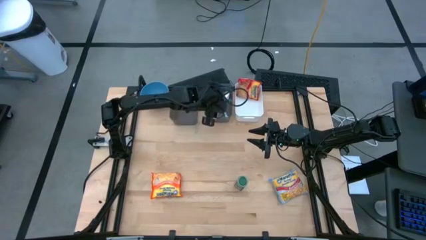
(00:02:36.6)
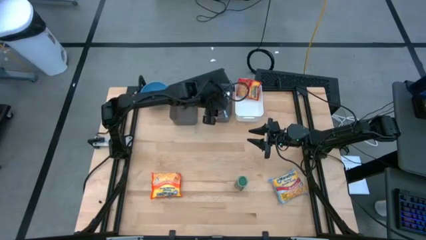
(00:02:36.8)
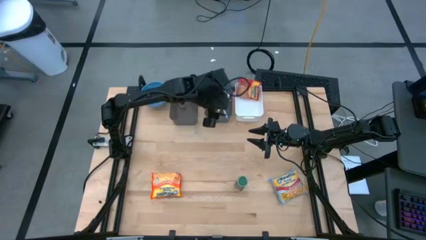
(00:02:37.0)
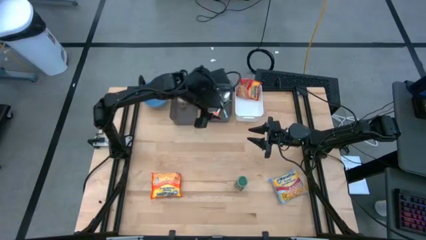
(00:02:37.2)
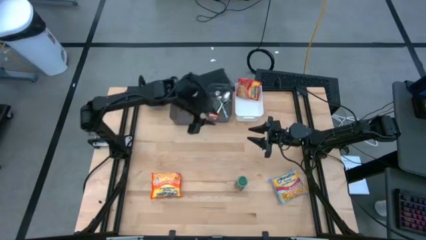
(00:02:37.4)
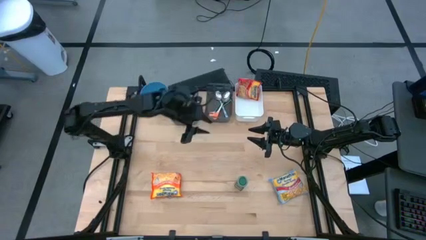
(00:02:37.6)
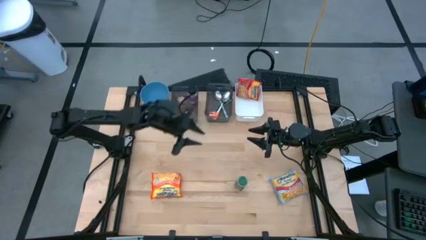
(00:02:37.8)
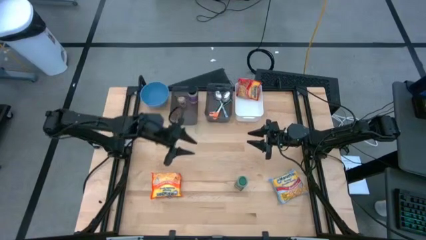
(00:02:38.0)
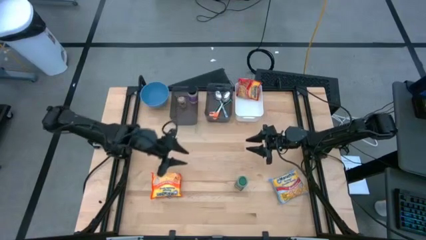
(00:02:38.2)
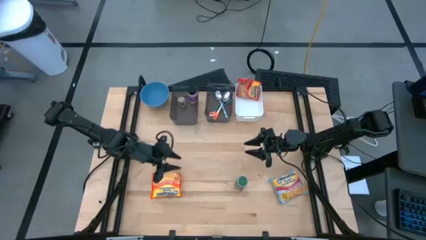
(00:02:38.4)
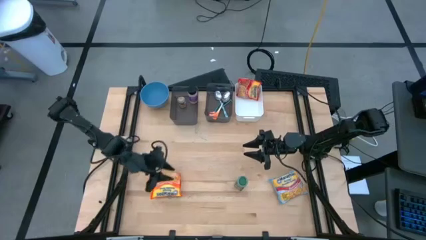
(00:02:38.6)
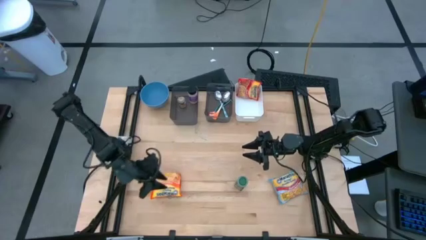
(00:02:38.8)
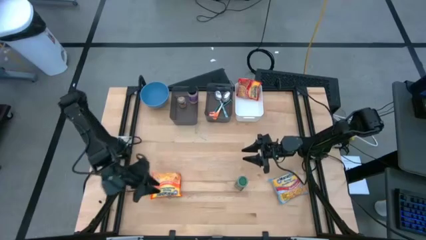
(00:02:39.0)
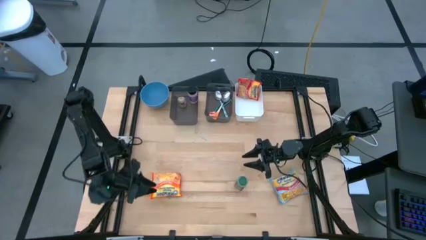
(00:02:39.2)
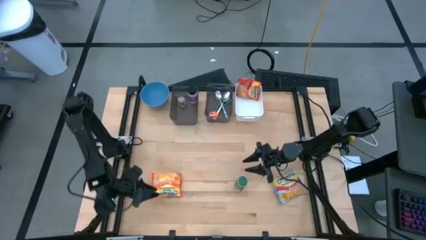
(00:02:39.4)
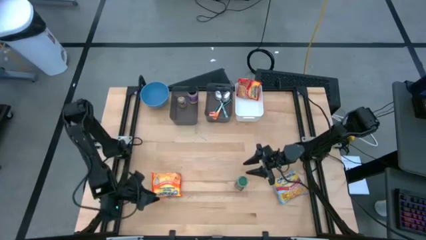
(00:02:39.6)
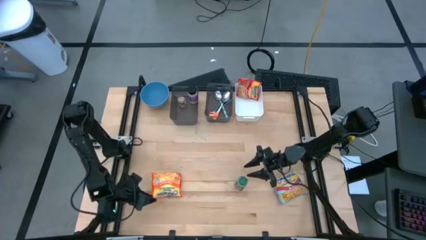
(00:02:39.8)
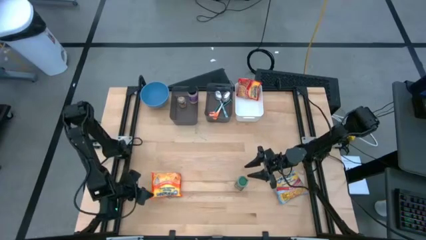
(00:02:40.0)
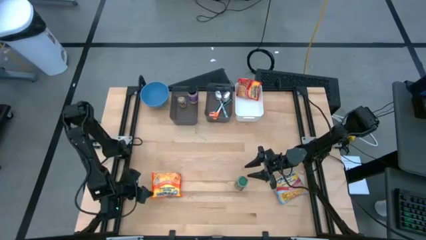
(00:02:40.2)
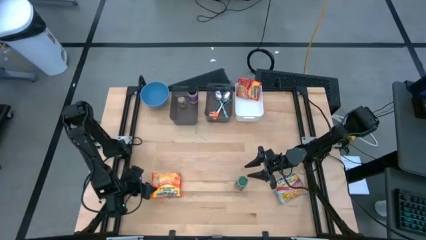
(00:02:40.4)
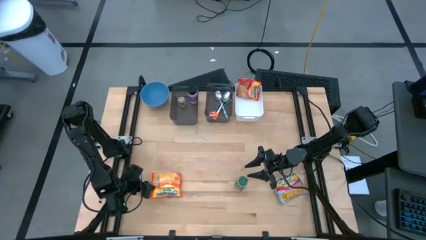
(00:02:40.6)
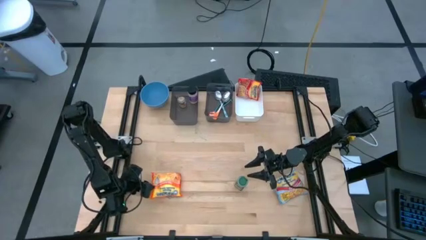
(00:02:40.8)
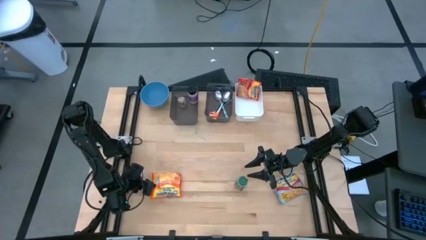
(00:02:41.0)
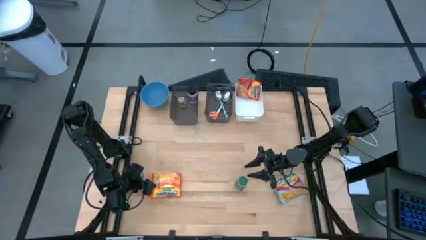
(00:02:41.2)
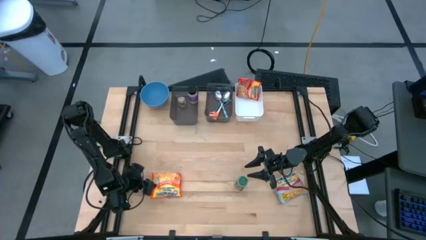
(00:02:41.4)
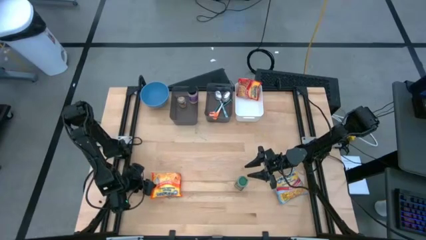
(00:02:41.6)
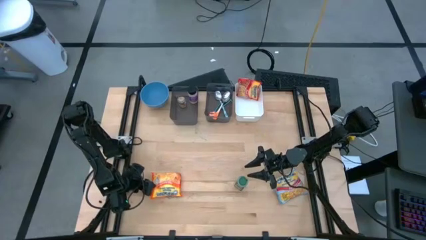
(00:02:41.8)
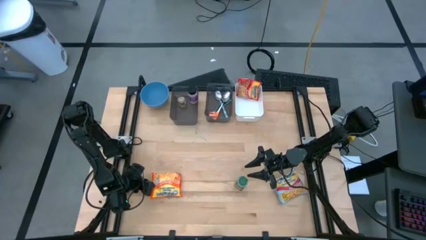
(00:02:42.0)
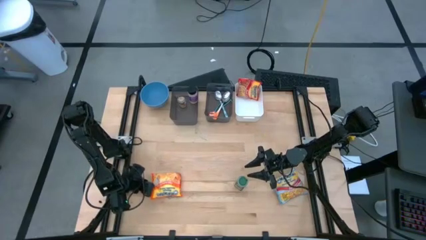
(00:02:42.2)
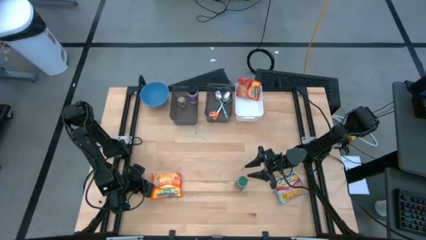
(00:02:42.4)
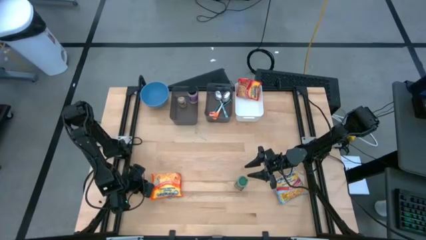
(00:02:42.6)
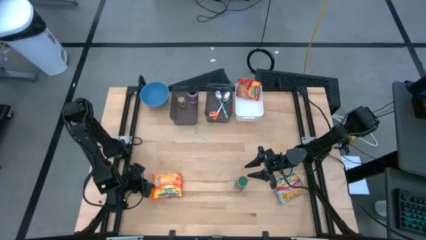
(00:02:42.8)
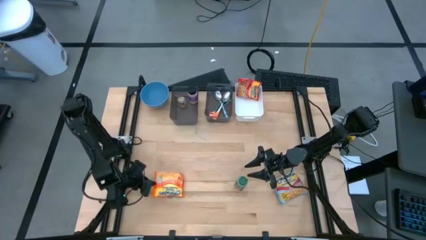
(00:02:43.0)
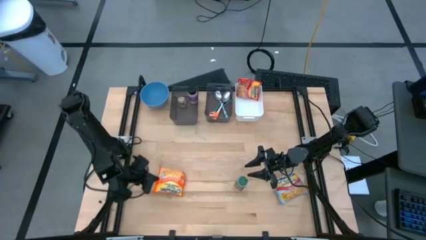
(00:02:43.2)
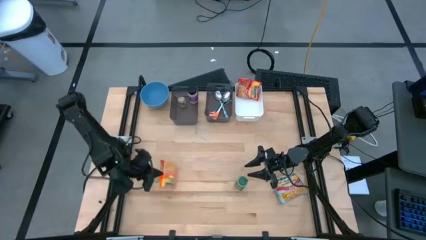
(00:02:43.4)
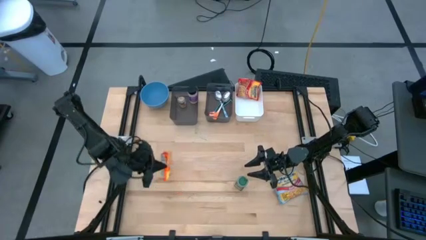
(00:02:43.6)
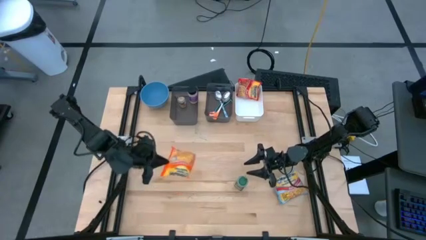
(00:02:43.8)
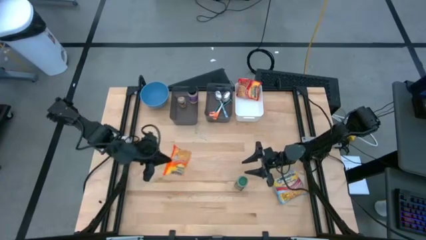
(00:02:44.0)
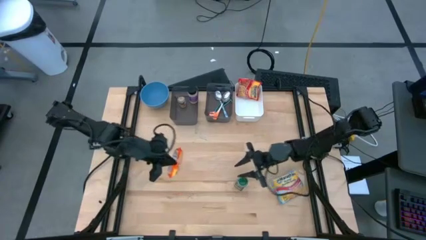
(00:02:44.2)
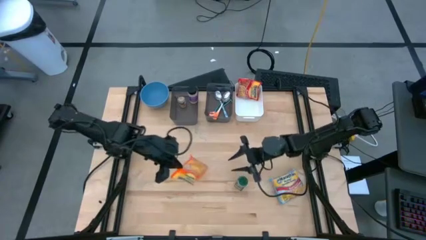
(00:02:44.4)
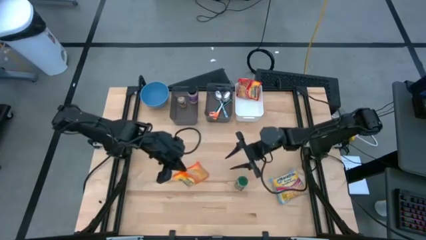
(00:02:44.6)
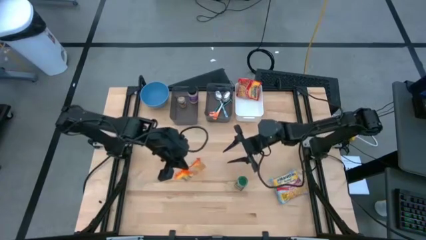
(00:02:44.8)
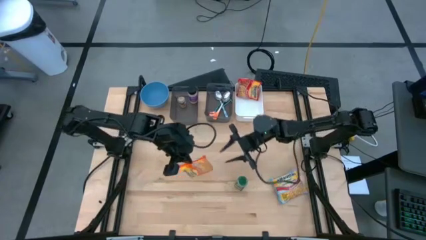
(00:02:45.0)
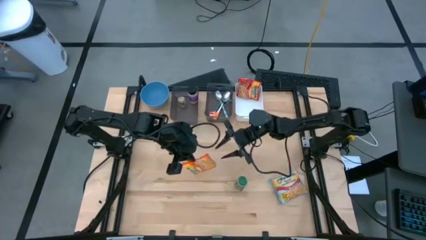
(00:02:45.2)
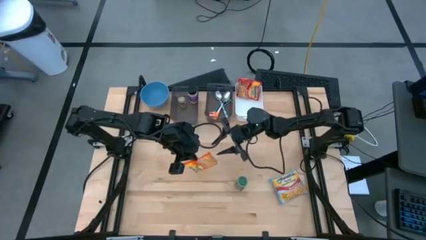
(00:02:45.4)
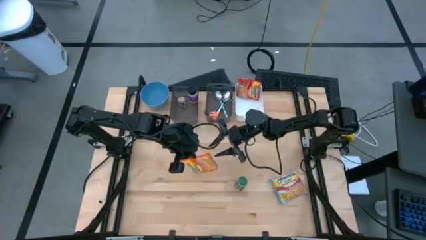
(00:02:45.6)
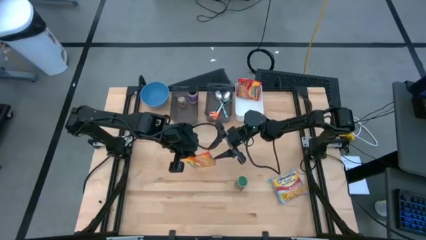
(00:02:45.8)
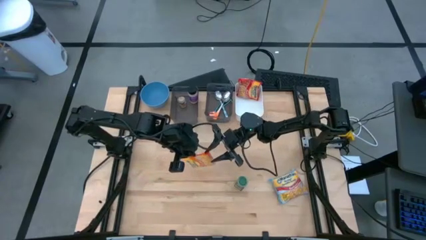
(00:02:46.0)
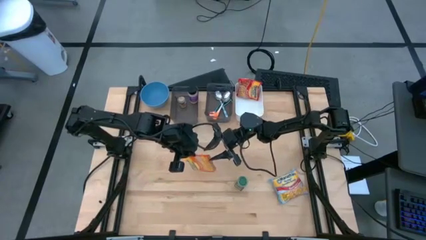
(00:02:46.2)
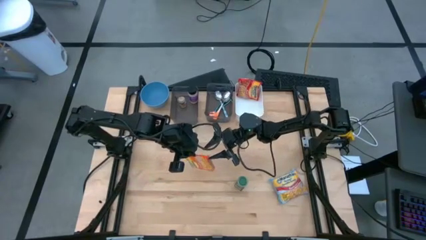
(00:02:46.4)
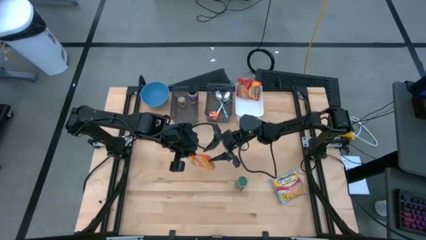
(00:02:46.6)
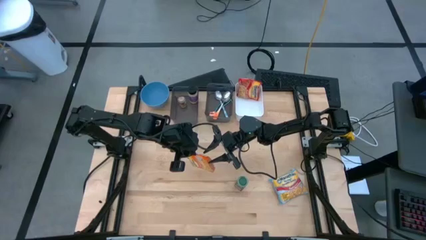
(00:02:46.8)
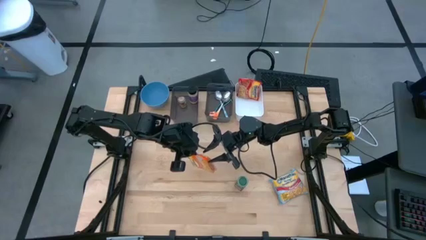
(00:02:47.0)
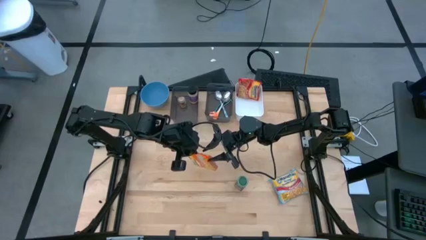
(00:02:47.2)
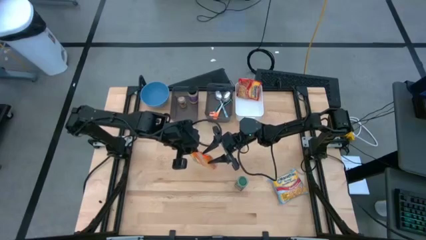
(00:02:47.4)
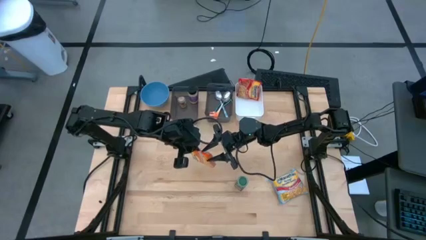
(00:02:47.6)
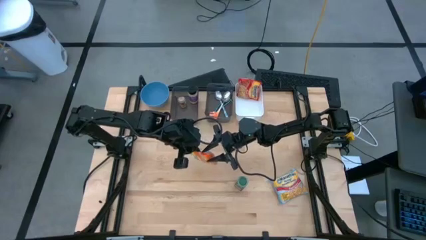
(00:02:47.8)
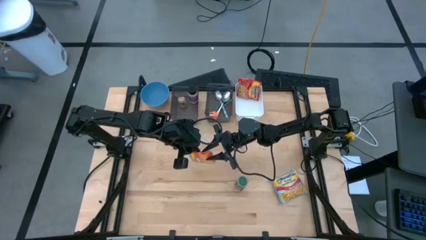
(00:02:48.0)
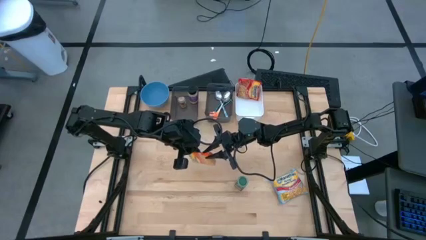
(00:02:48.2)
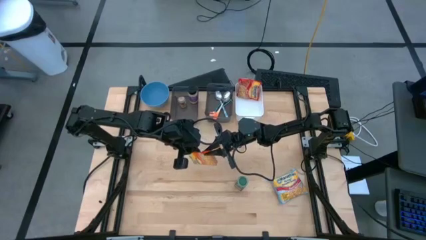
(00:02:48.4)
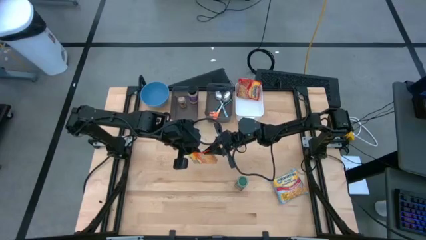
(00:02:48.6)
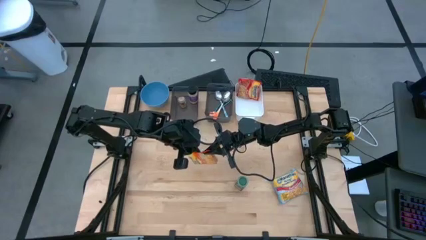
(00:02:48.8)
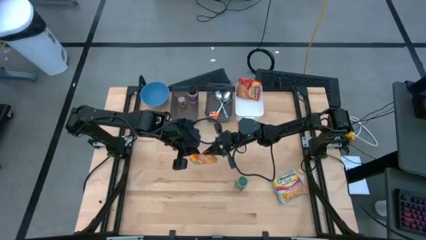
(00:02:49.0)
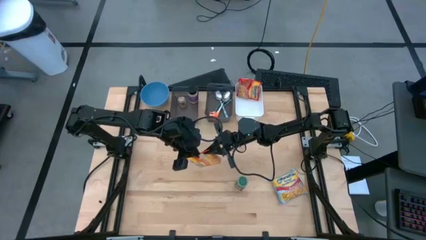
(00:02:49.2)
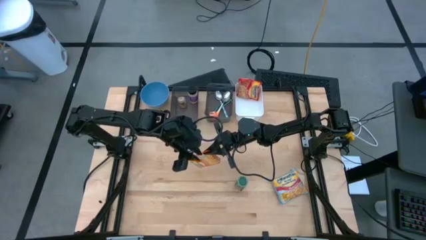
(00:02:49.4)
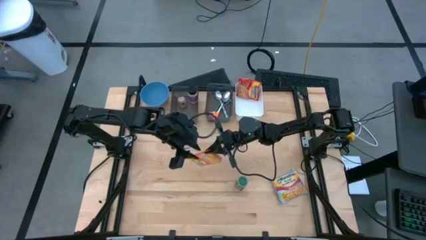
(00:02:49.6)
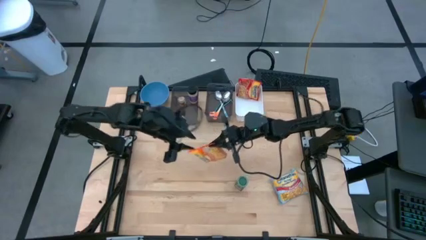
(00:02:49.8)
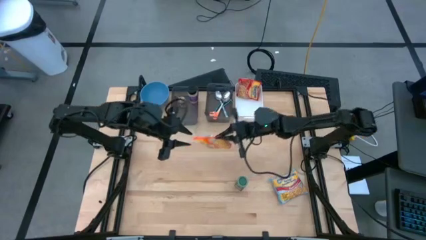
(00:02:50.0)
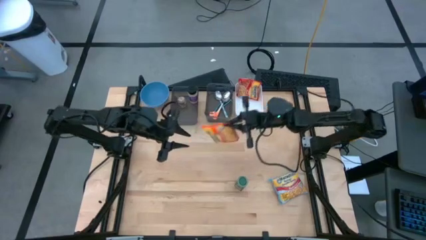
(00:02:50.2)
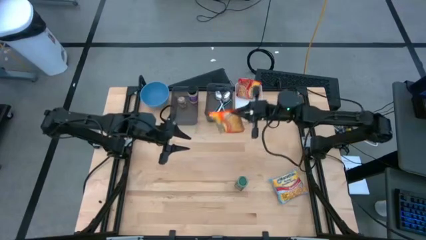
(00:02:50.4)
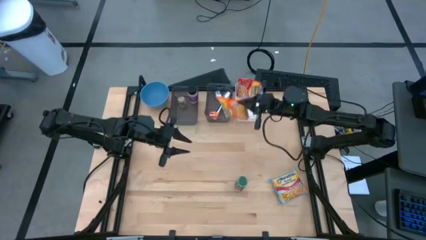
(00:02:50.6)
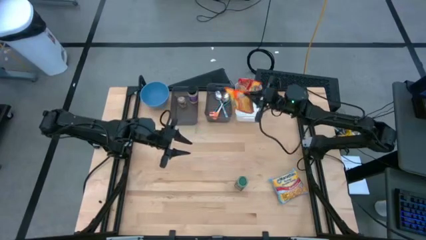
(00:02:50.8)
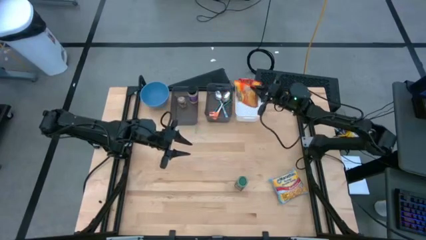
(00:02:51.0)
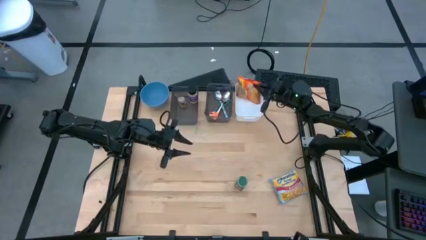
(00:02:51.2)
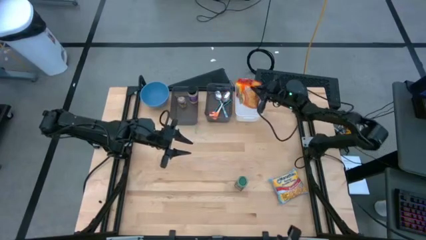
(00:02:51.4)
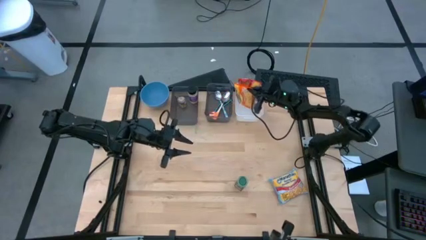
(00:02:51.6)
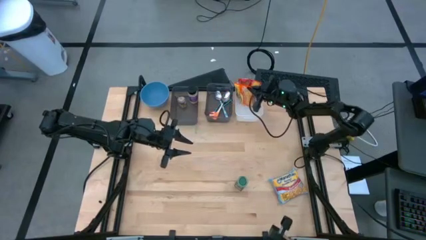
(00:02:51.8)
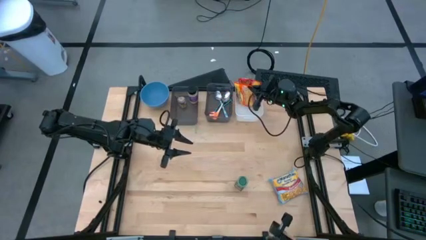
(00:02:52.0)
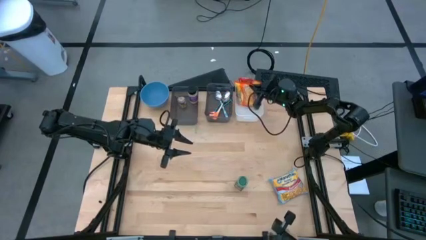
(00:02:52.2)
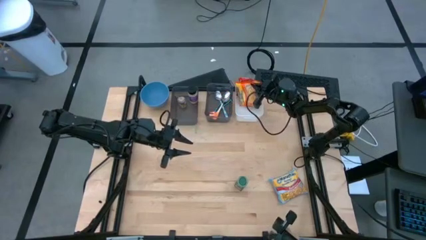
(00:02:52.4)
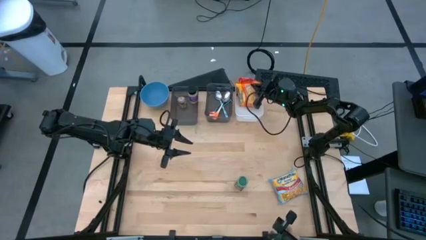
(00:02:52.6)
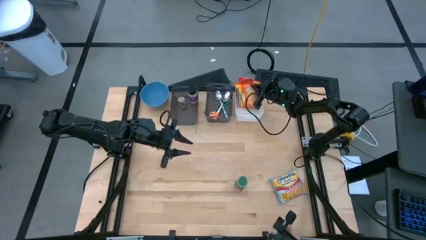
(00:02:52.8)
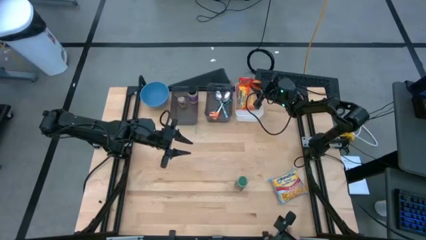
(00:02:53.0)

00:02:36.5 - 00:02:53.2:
Task: Pick & Place Food Item
Put the orange noodle pack into the white bin
